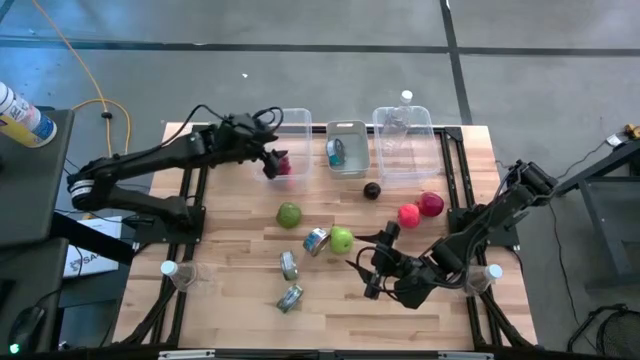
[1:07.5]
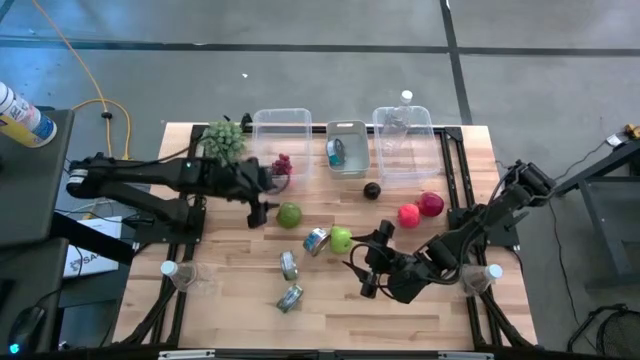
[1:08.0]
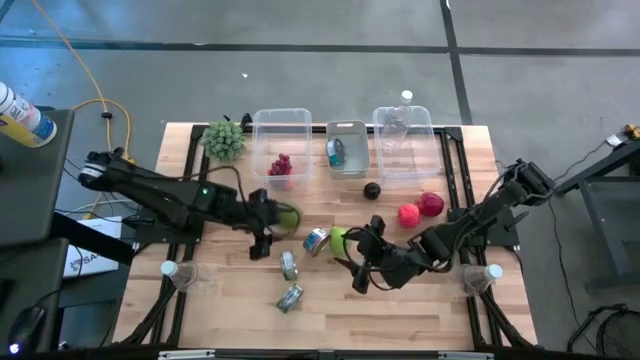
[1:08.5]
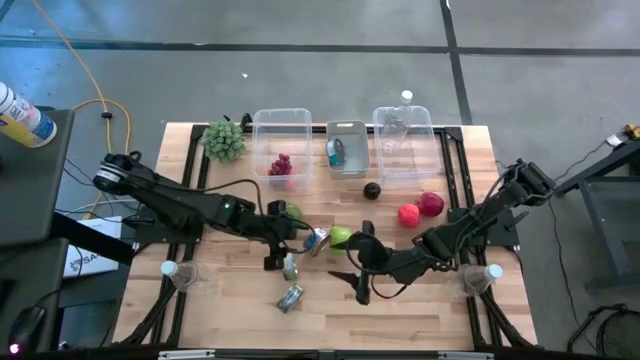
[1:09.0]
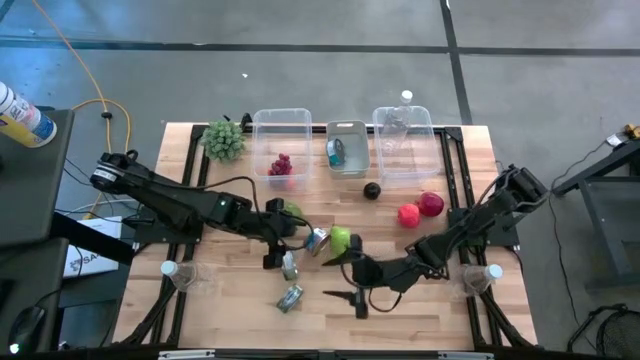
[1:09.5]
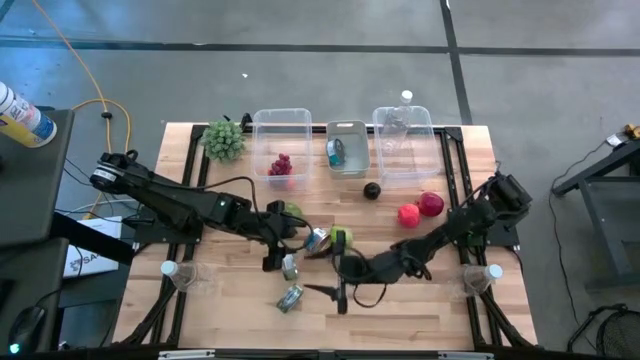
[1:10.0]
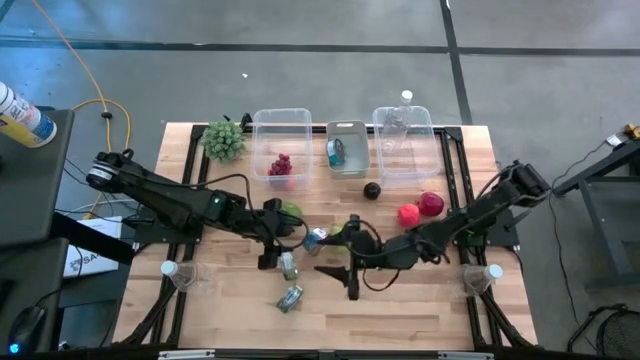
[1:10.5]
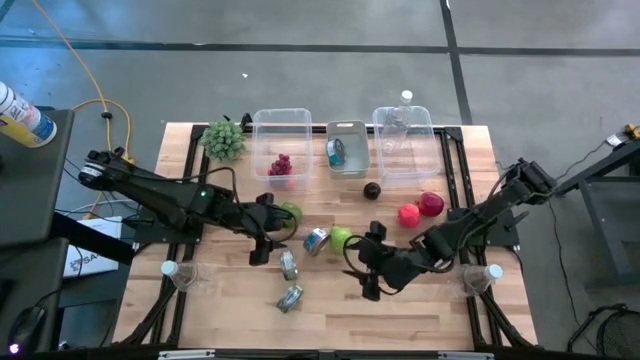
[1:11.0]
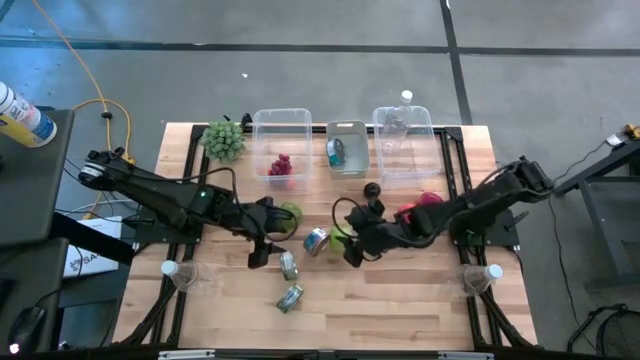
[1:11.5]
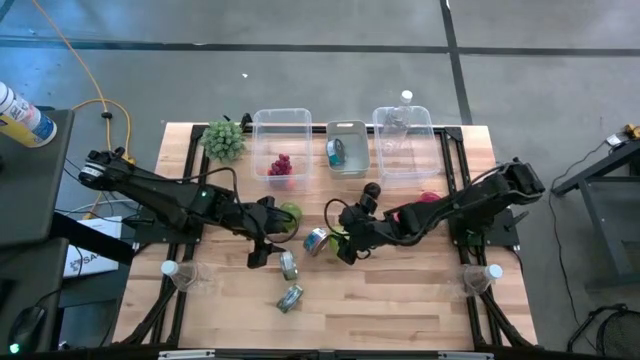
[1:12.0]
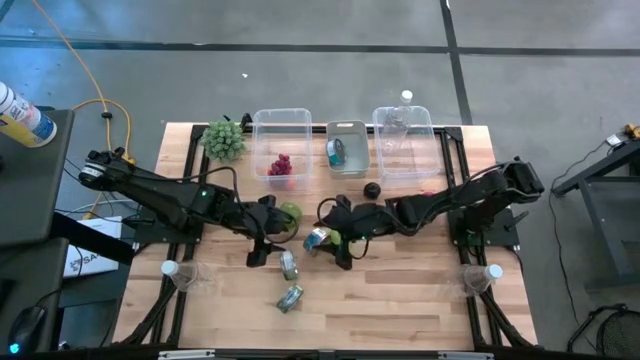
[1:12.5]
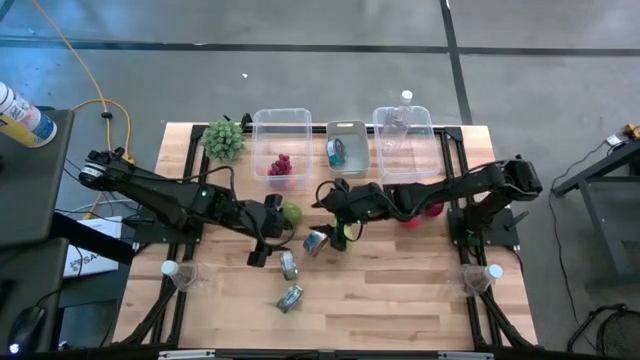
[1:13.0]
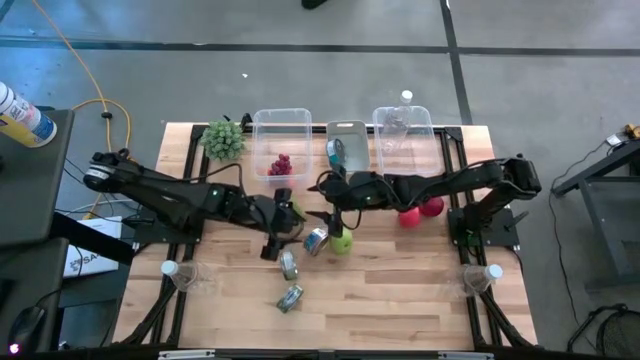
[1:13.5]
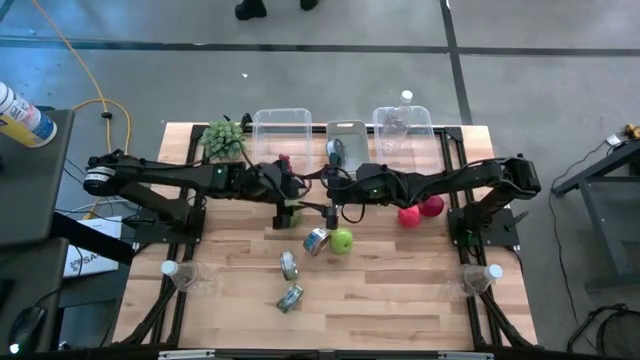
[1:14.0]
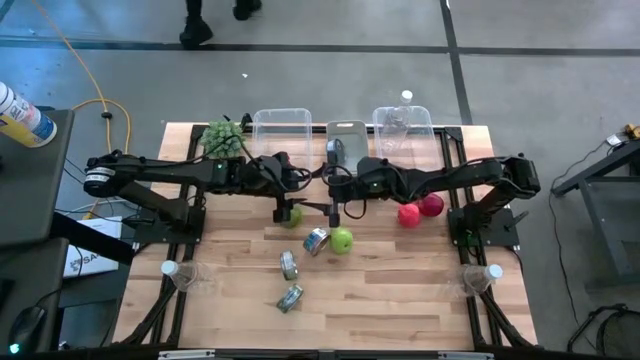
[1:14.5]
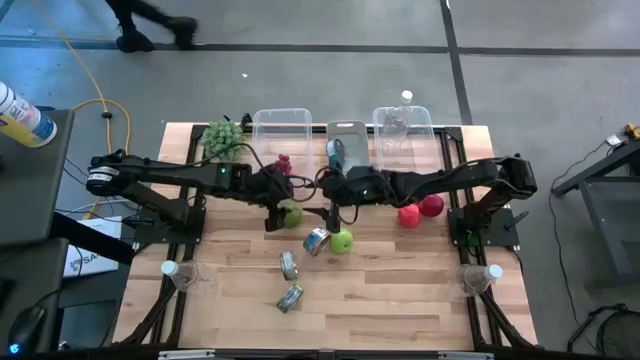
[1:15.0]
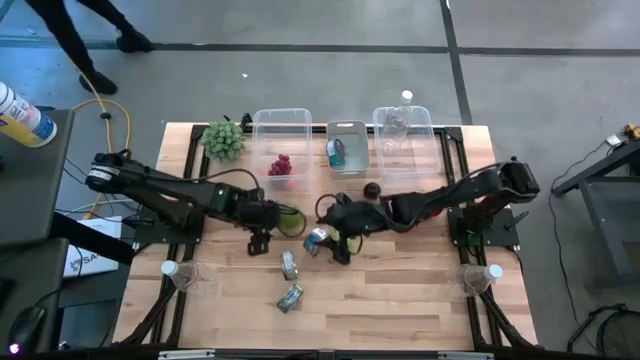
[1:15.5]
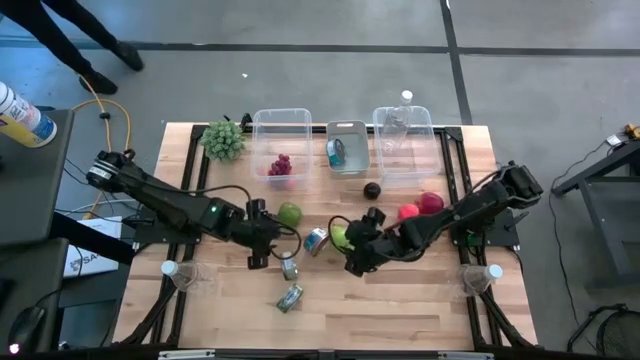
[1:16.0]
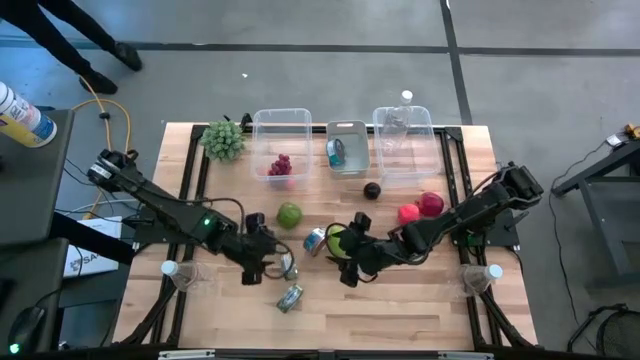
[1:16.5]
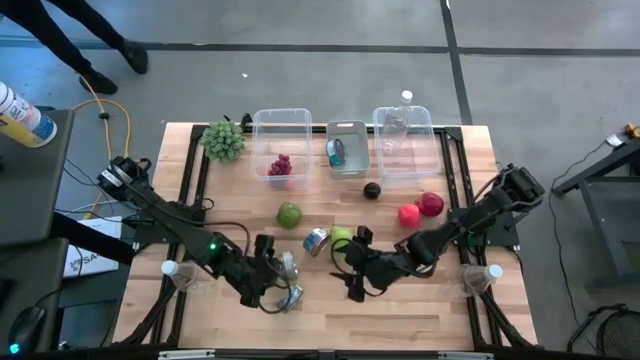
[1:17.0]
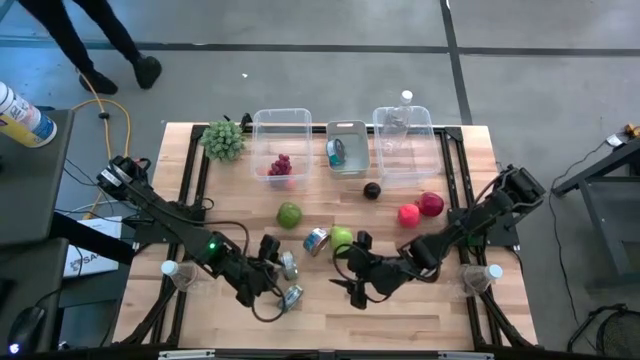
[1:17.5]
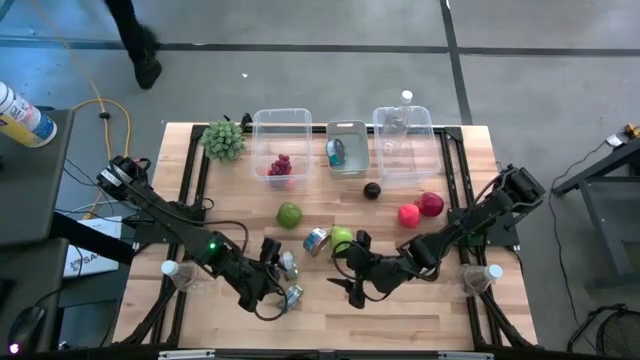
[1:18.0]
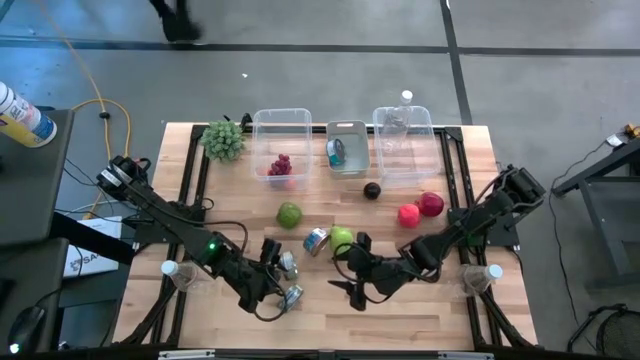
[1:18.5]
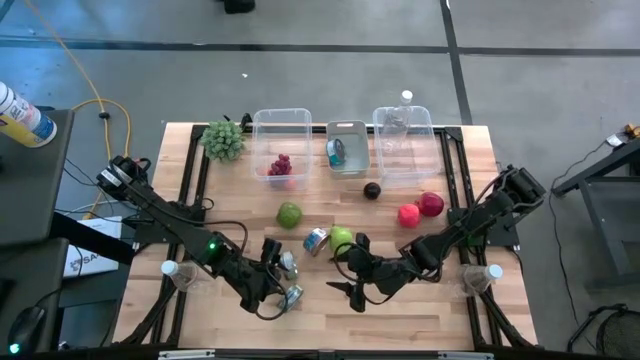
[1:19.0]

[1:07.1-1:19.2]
Task: Pick & Place Food Item
Put the green tuna can into the gray bin

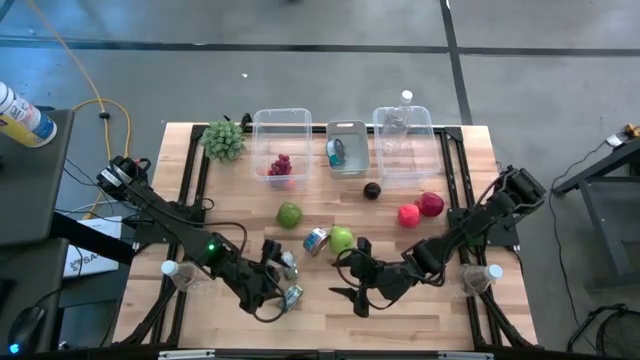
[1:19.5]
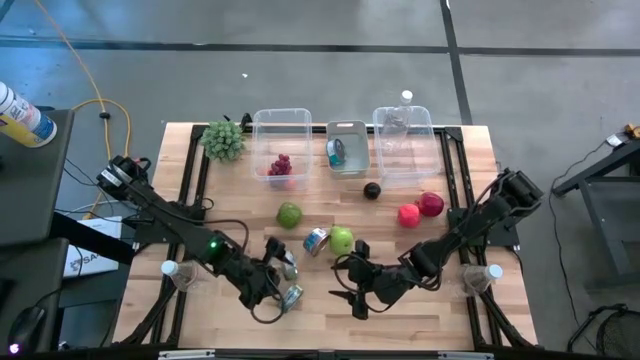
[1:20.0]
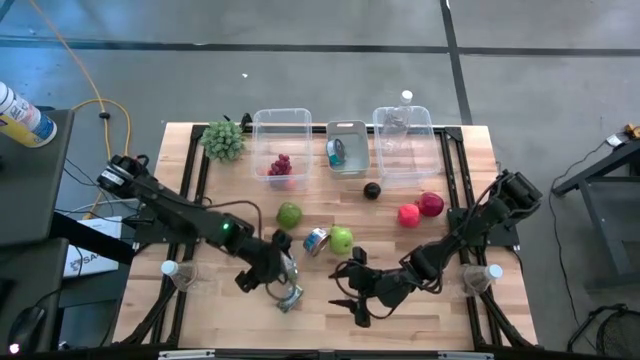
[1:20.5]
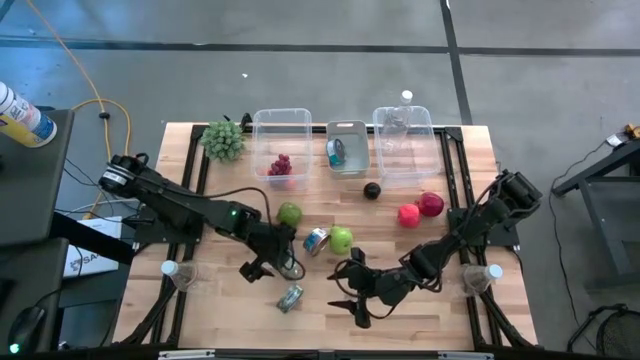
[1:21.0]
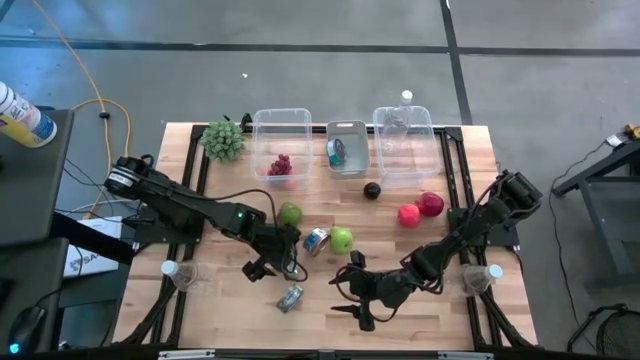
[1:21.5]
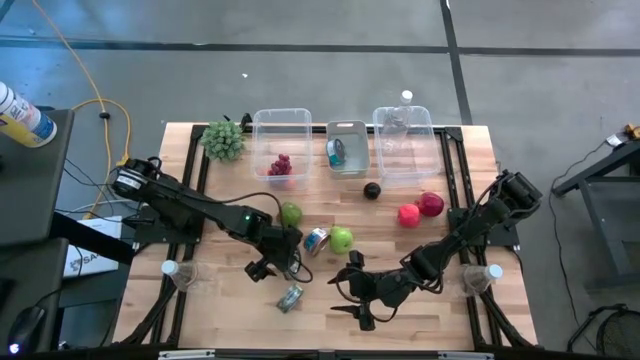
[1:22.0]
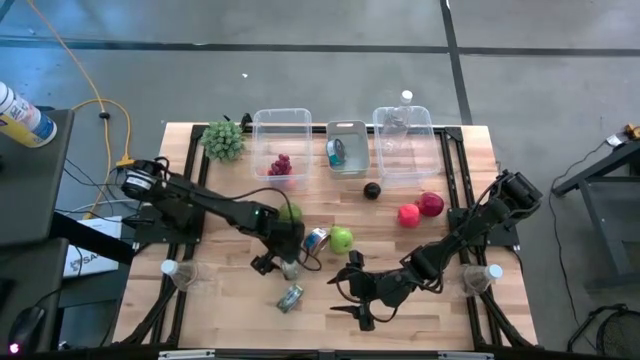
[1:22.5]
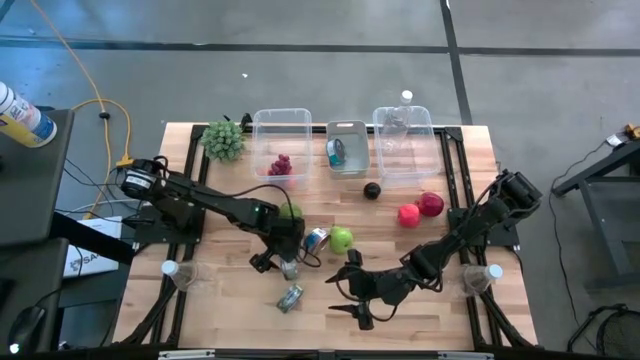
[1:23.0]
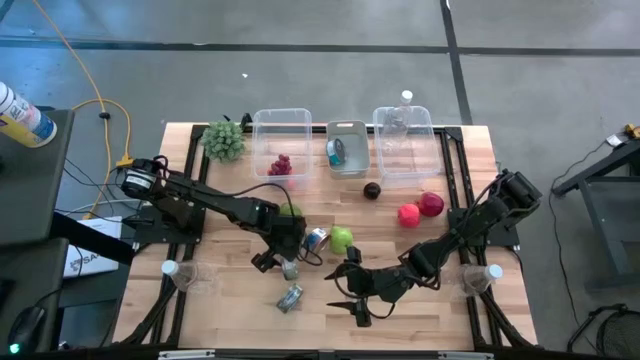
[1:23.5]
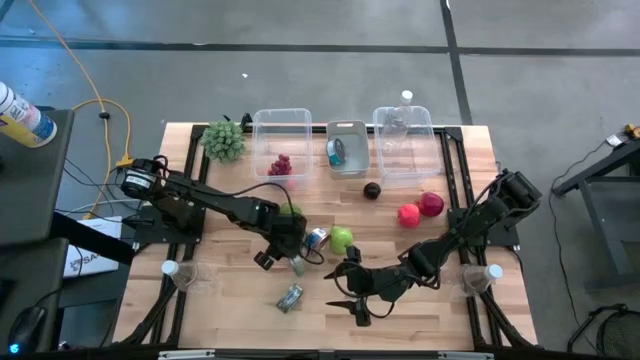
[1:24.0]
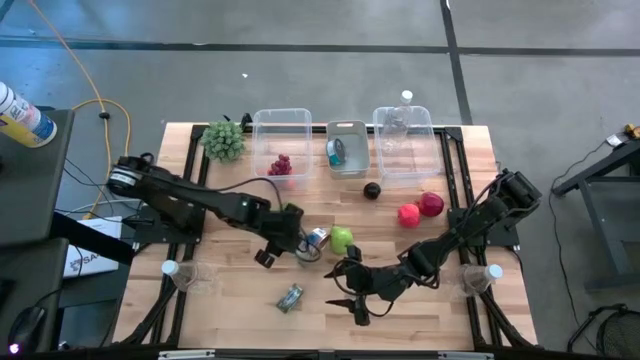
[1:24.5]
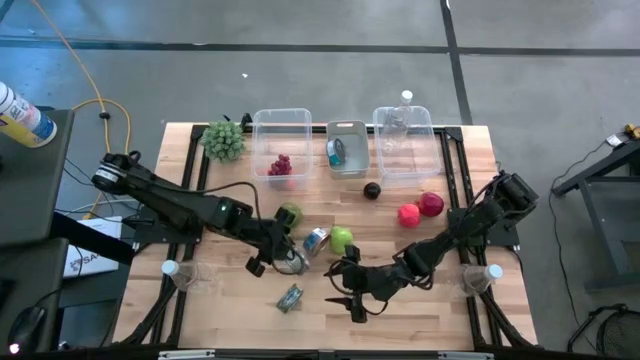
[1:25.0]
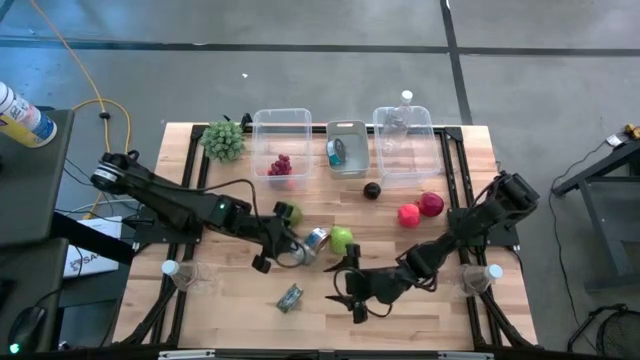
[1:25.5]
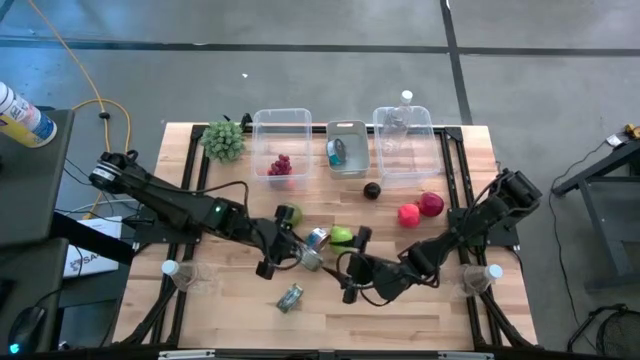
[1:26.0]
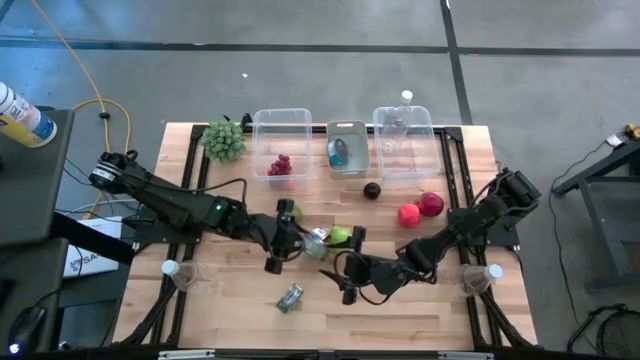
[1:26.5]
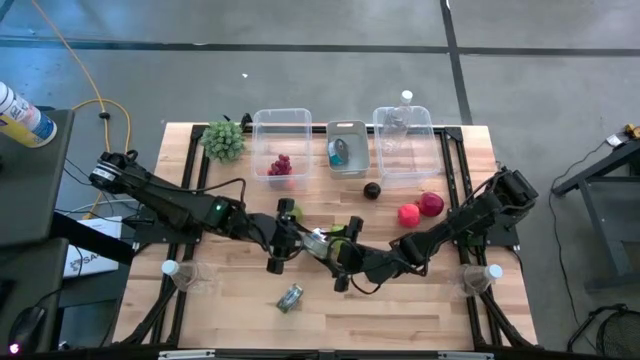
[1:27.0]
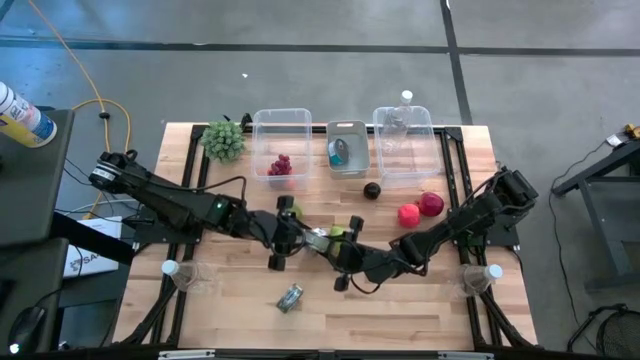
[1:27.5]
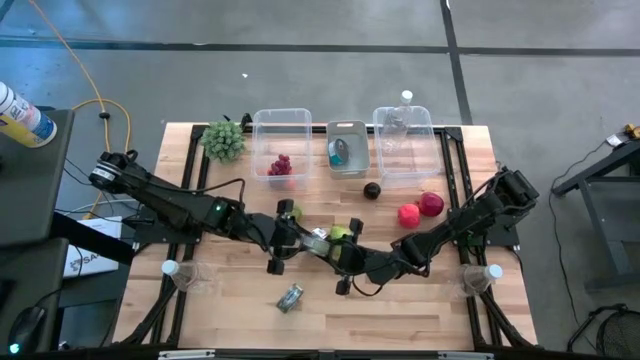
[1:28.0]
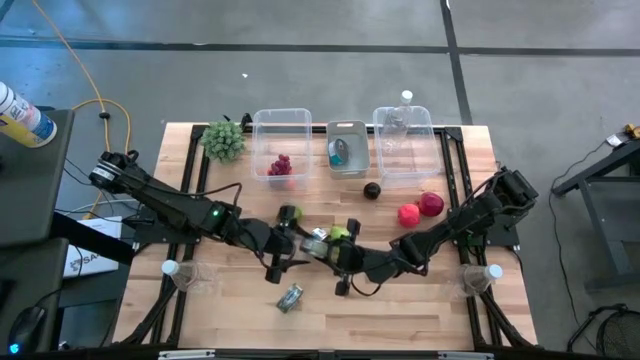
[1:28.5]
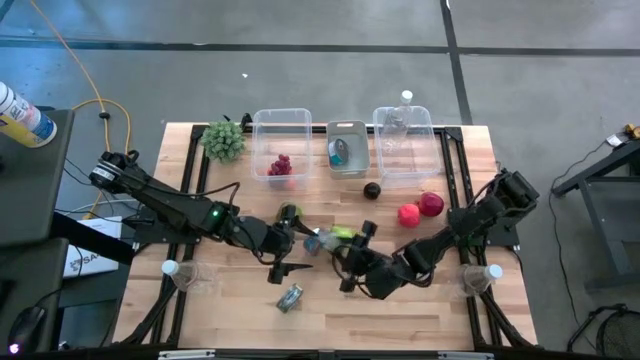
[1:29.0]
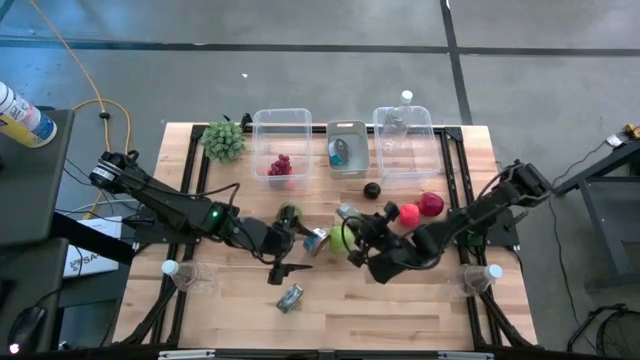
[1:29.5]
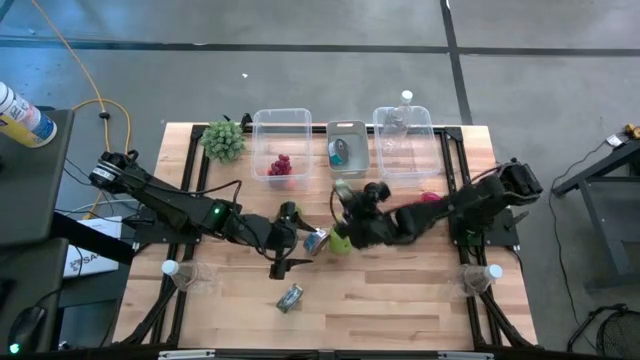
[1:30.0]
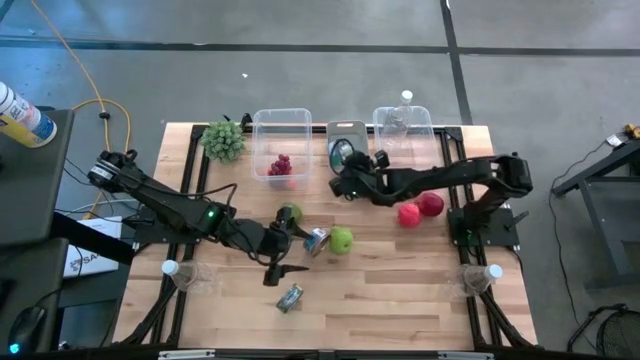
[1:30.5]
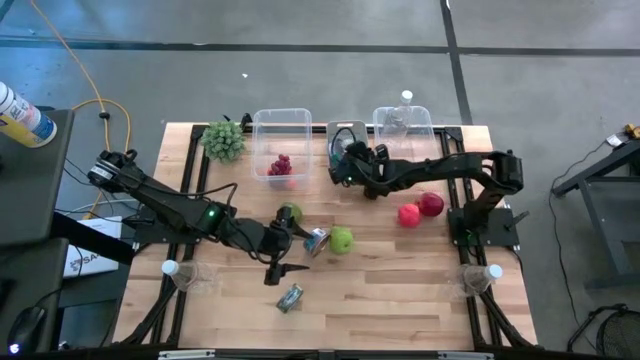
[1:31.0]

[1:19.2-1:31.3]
Put the green tuna can into the gray bin
